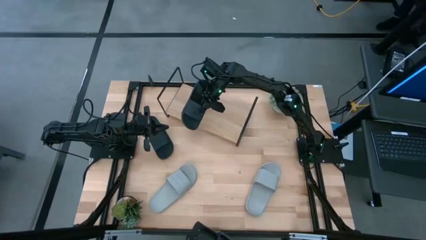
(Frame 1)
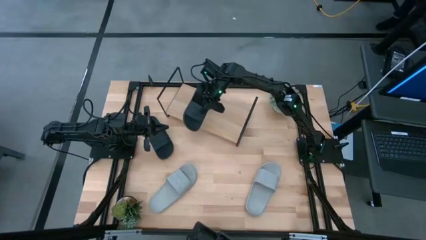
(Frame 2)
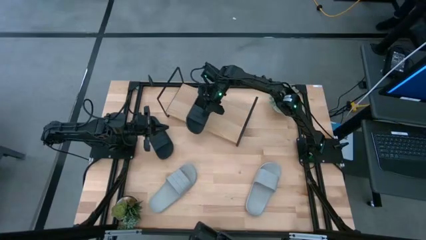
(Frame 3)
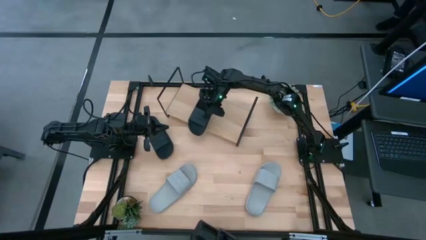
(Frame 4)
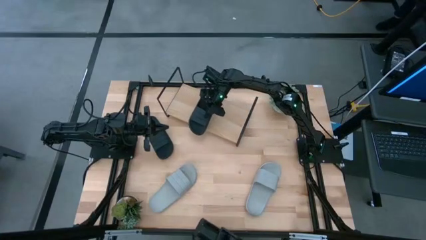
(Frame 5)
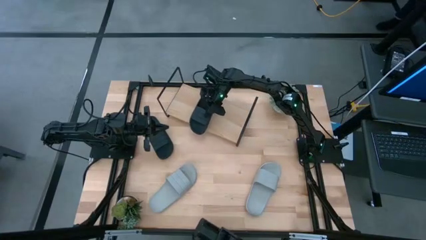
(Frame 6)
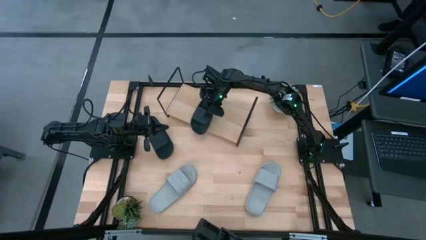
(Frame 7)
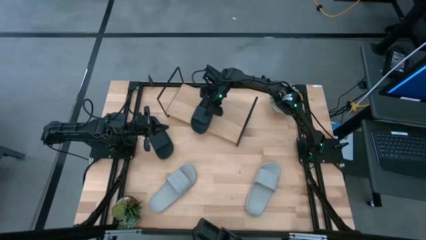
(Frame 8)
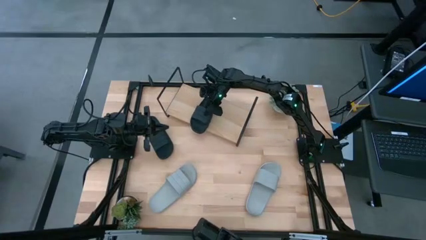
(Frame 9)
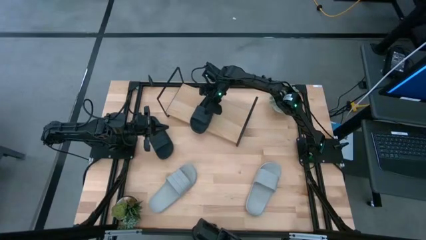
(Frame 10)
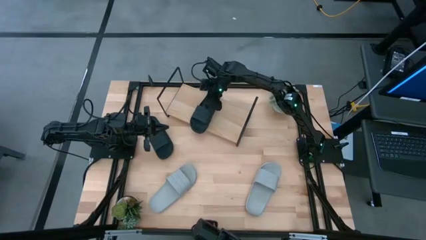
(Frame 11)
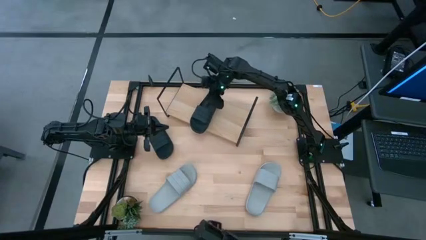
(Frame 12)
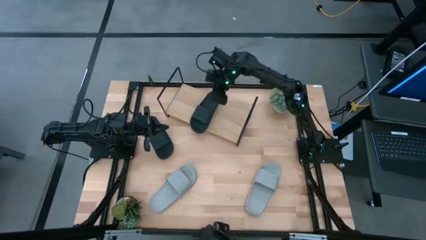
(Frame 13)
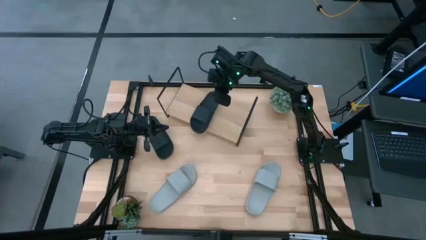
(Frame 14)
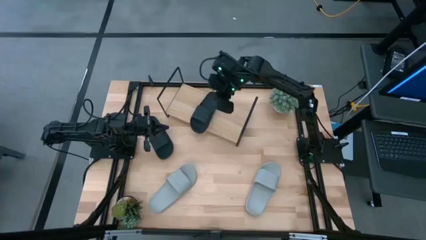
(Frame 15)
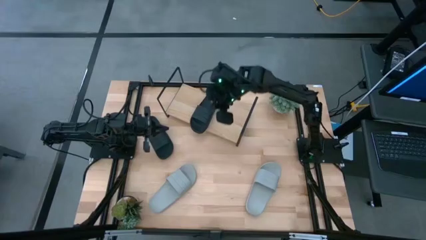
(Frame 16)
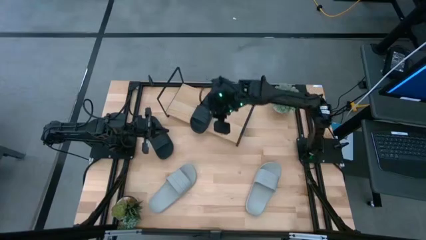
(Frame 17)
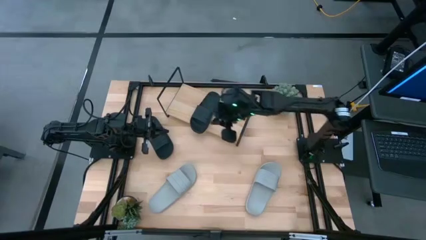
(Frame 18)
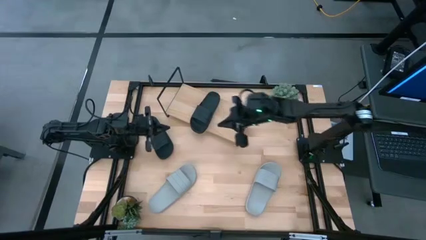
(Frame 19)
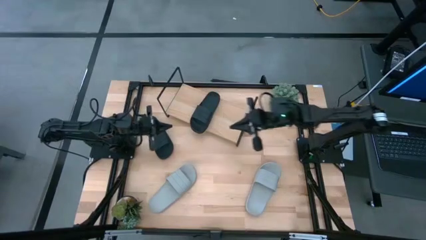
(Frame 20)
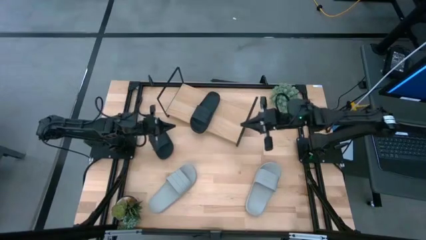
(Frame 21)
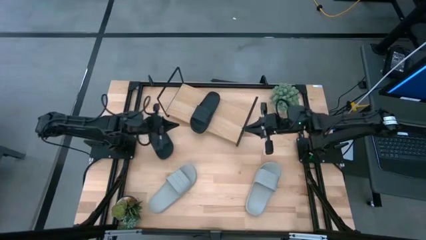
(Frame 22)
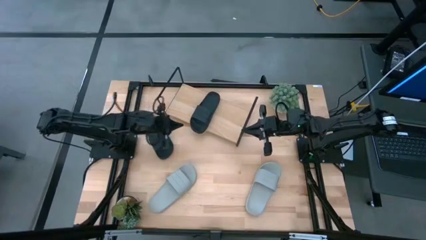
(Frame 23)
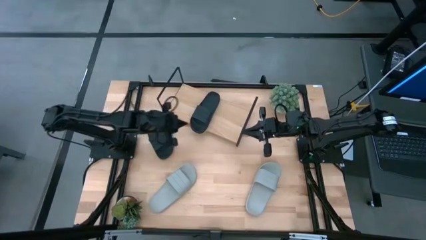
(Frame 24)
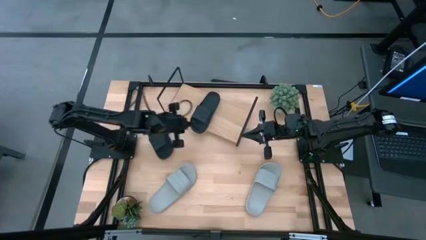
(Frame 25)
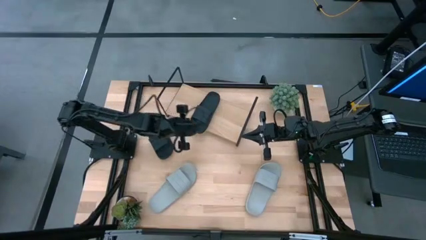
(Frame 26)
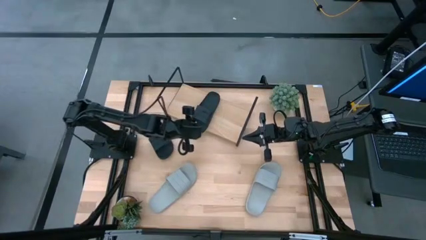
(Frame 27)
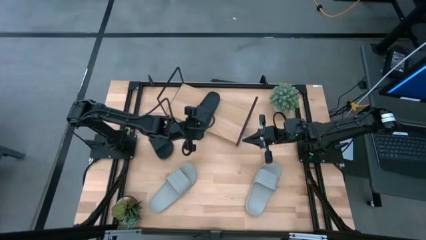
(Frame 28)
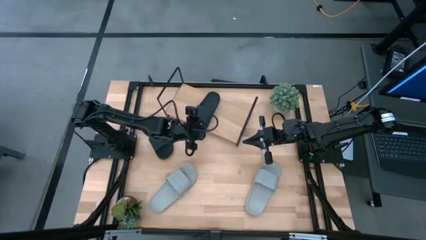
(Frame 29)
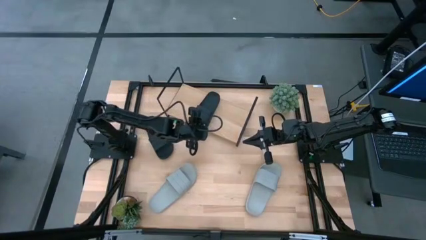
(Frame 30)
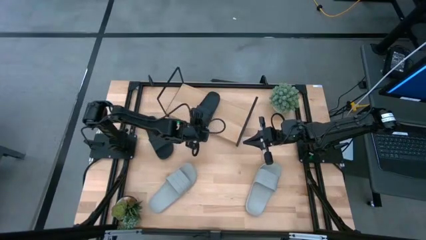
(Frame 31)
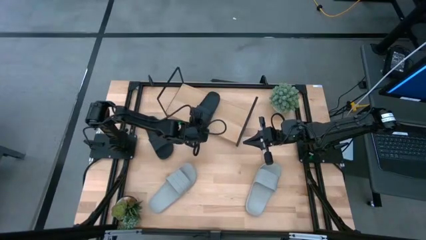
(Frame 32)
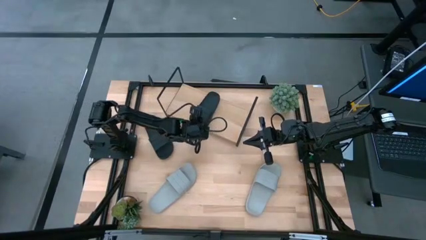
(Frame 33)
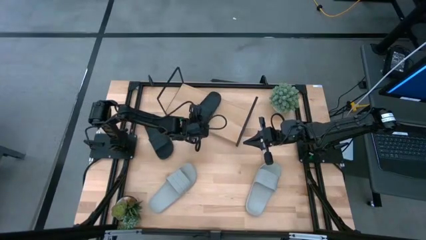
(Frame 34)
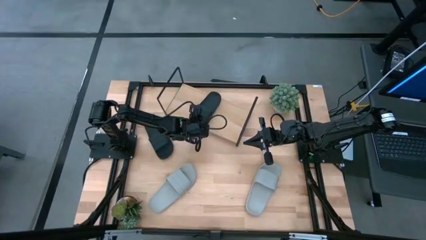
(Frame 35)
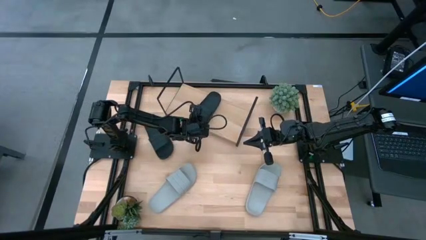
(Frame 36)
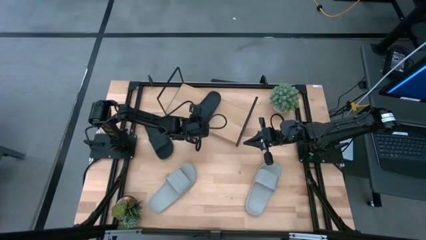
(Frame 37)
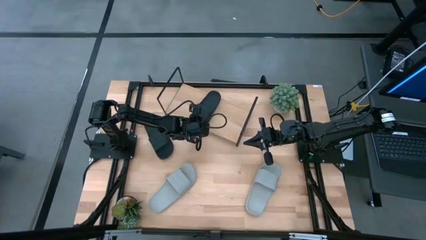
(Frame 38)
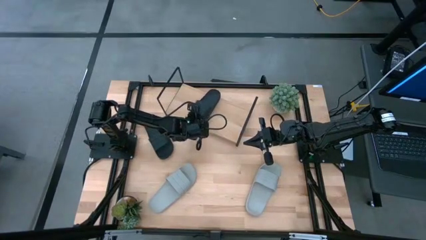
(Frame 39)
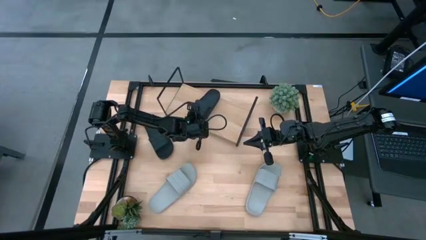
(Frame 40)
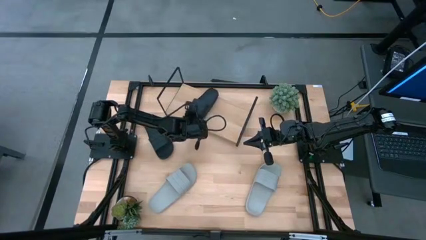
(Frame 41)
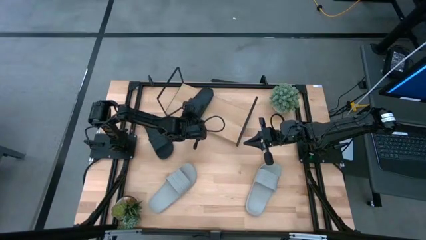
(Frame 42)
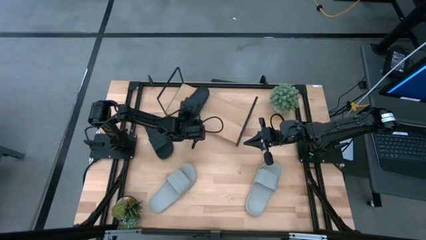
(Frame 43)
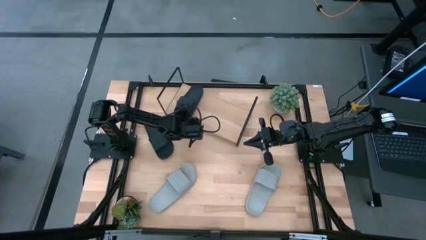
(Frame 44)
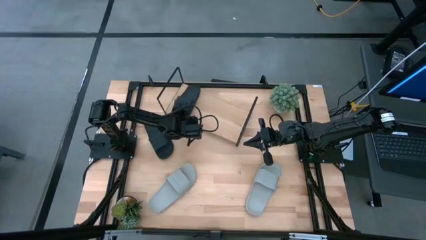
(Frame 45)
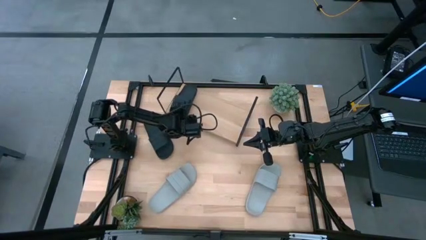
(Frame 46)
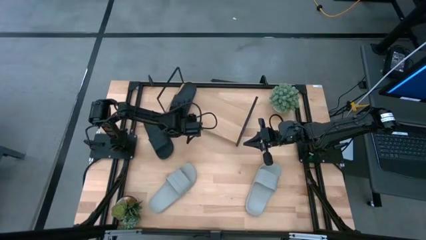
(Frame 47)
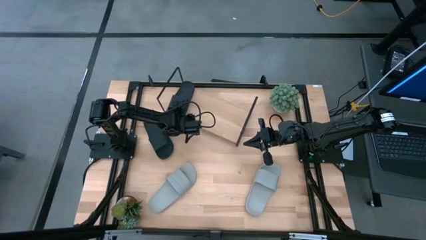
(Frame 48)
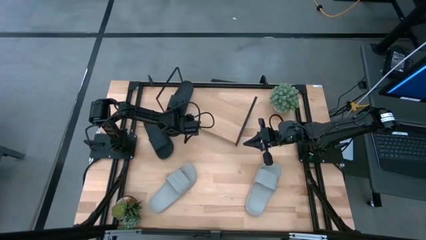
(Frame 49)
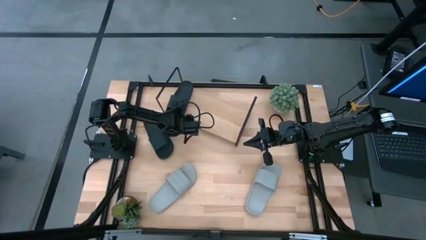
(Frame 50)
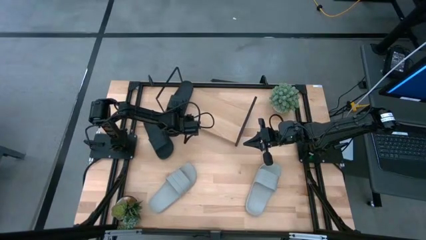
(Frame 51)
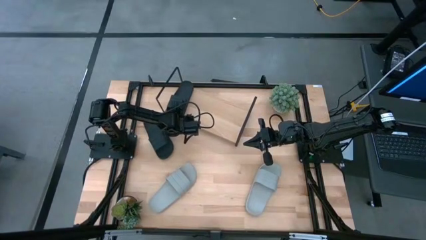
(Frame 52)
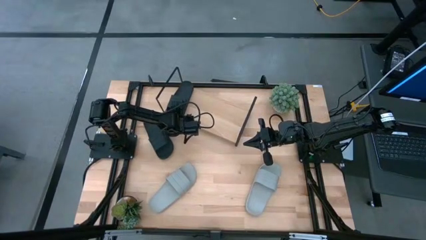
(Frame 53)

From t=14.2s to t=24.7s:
Task: Pick and place slides into the shelf
Put the right black slide on the shelf
